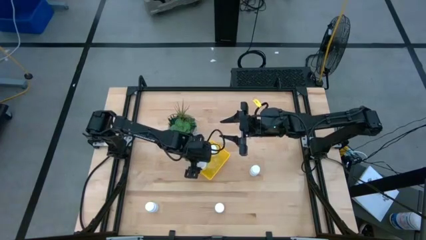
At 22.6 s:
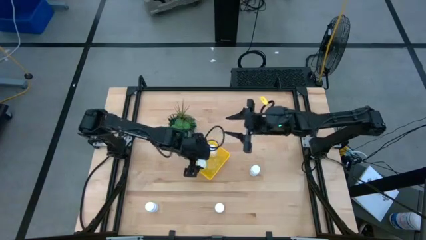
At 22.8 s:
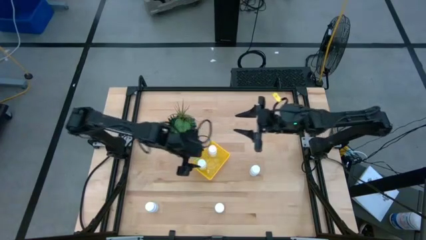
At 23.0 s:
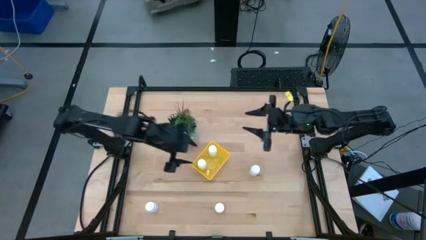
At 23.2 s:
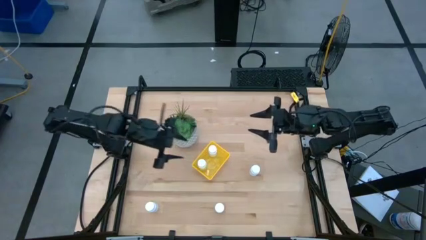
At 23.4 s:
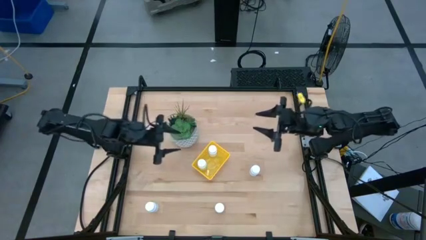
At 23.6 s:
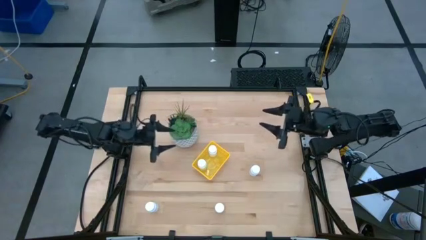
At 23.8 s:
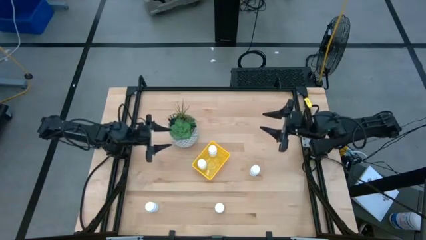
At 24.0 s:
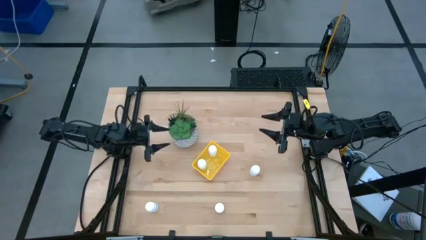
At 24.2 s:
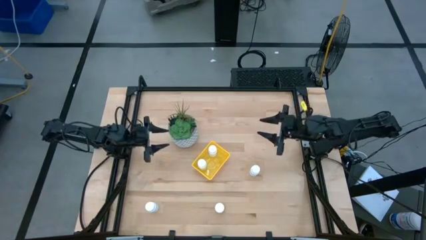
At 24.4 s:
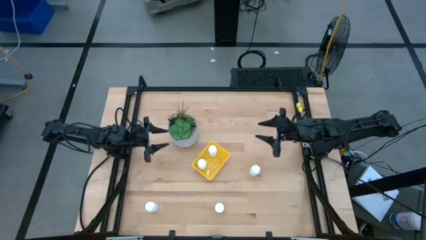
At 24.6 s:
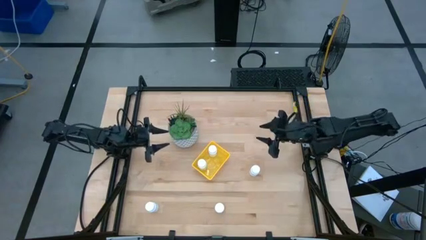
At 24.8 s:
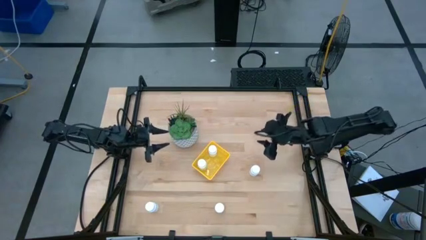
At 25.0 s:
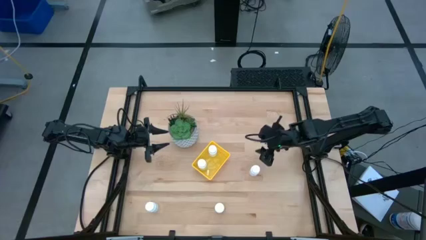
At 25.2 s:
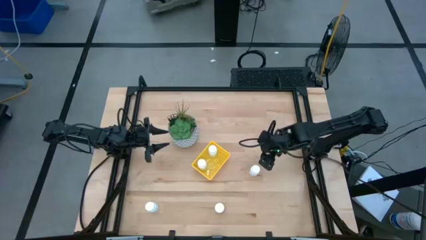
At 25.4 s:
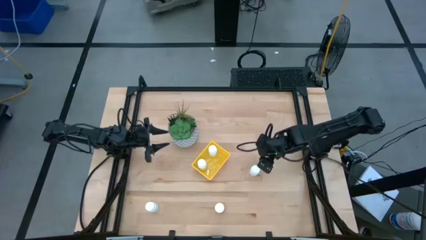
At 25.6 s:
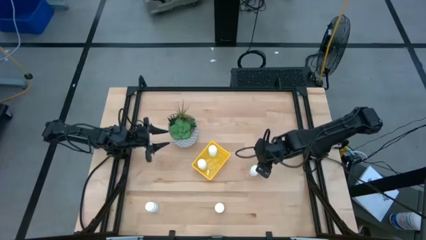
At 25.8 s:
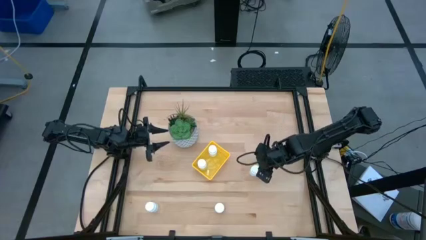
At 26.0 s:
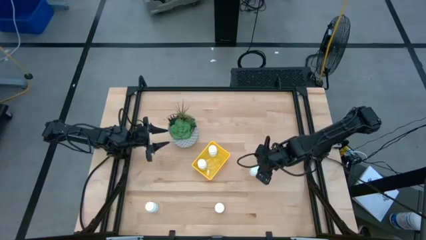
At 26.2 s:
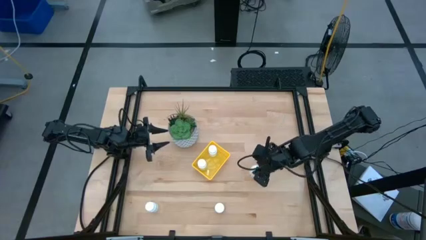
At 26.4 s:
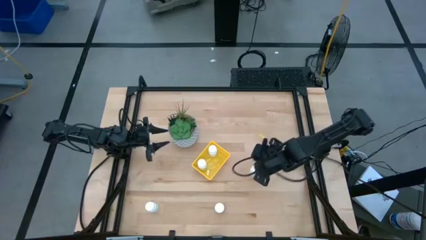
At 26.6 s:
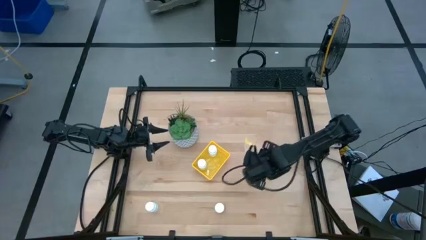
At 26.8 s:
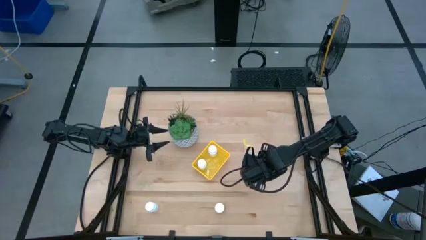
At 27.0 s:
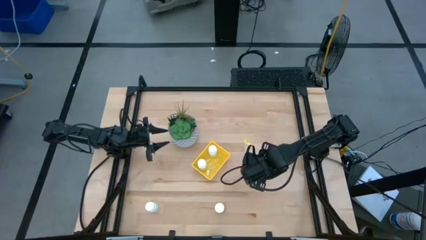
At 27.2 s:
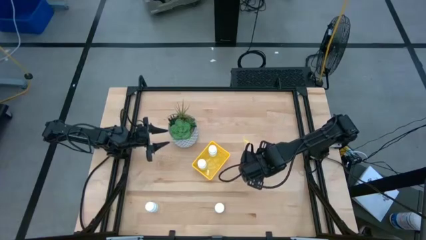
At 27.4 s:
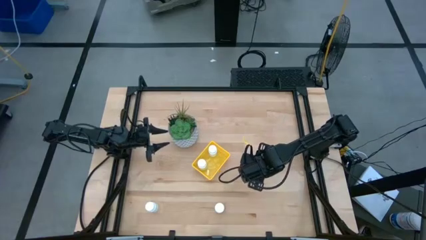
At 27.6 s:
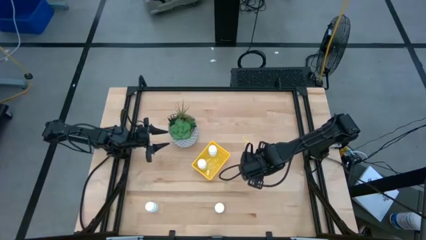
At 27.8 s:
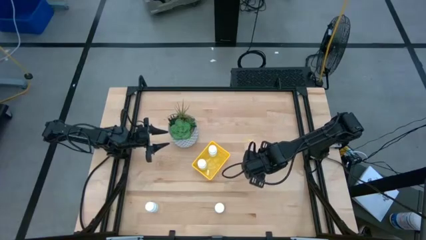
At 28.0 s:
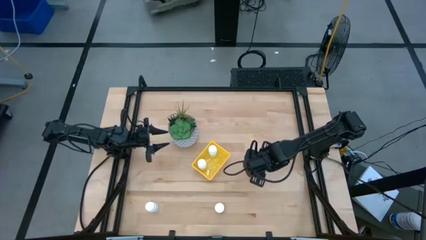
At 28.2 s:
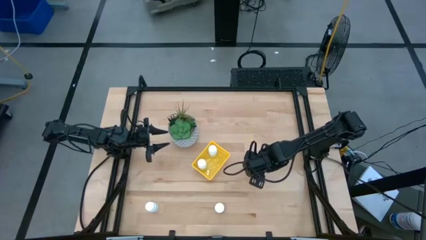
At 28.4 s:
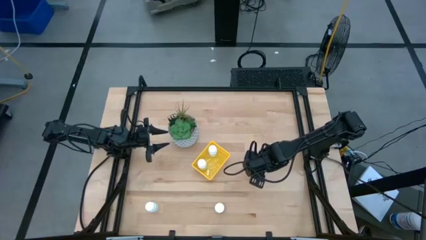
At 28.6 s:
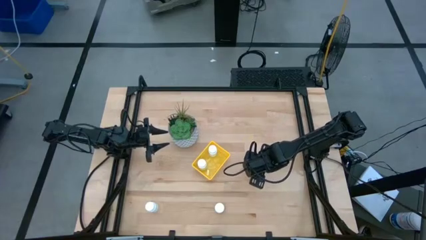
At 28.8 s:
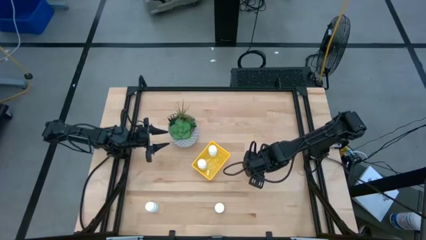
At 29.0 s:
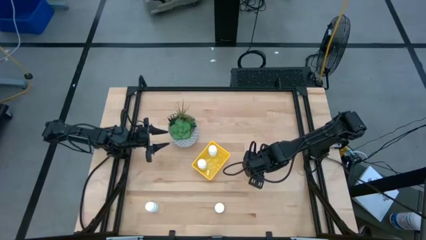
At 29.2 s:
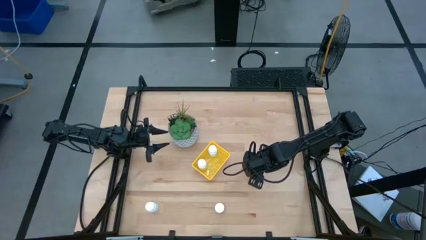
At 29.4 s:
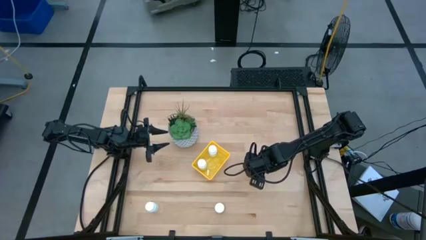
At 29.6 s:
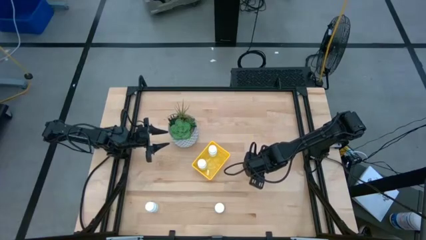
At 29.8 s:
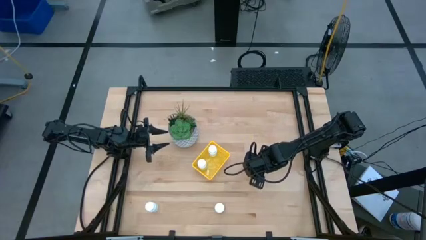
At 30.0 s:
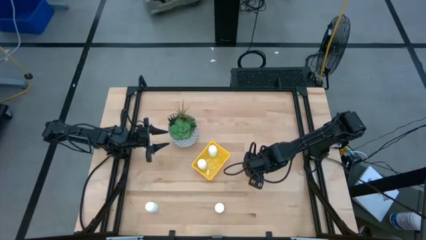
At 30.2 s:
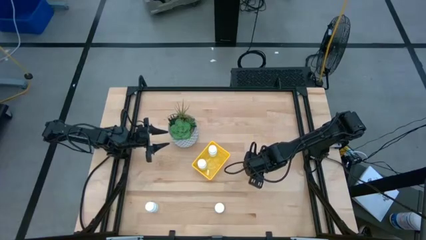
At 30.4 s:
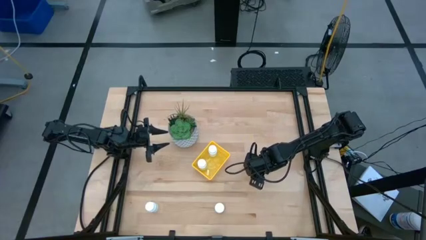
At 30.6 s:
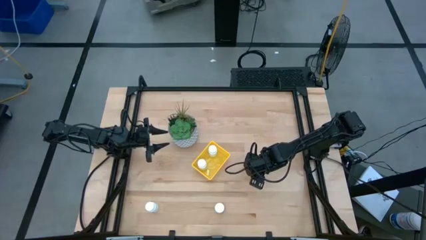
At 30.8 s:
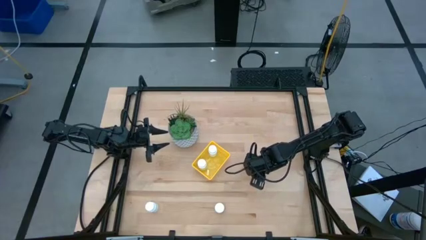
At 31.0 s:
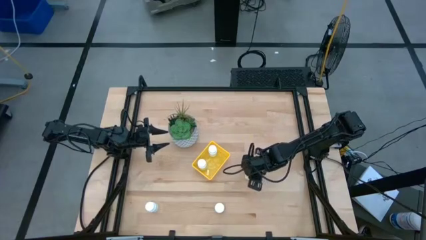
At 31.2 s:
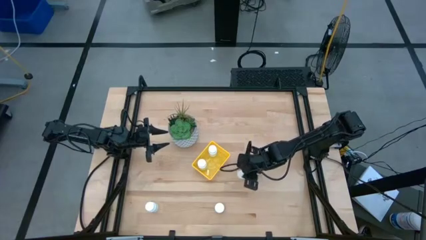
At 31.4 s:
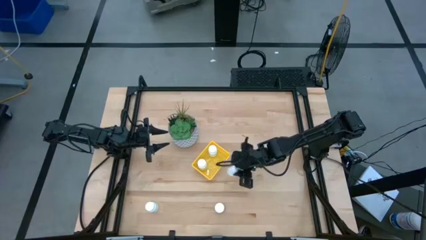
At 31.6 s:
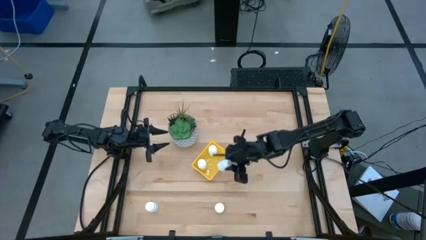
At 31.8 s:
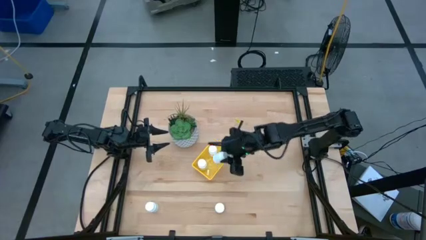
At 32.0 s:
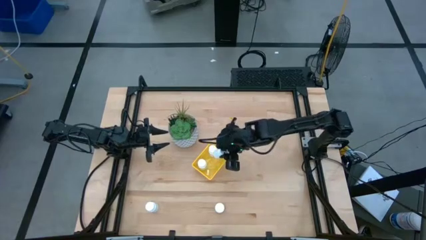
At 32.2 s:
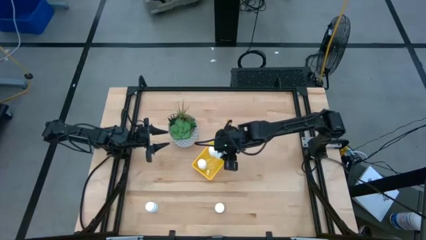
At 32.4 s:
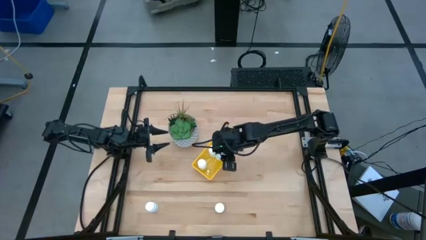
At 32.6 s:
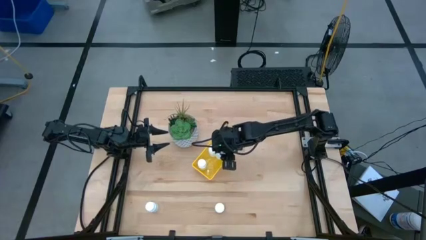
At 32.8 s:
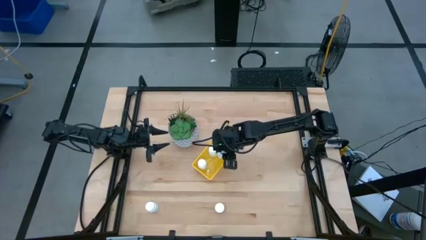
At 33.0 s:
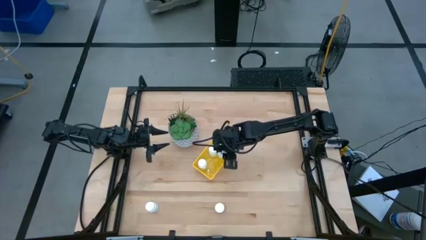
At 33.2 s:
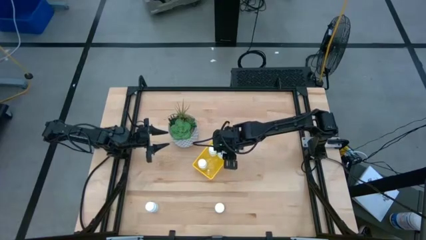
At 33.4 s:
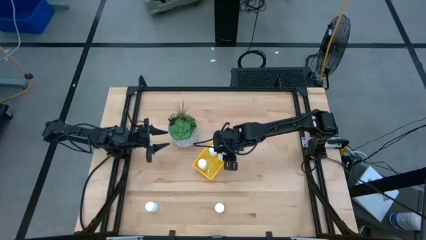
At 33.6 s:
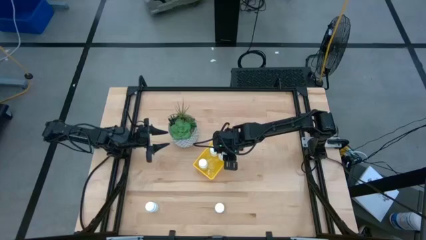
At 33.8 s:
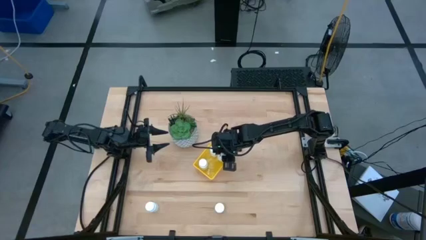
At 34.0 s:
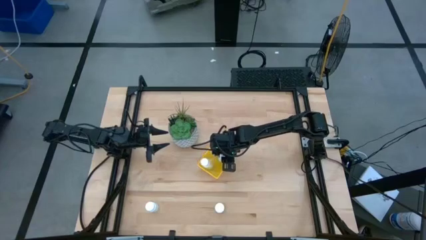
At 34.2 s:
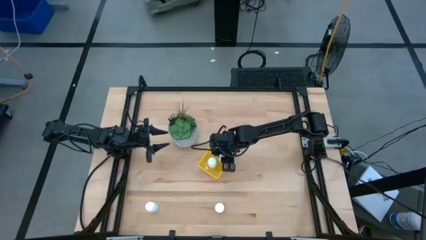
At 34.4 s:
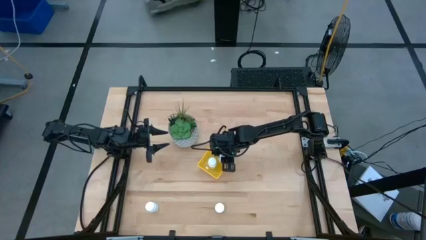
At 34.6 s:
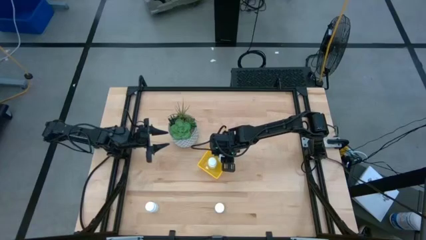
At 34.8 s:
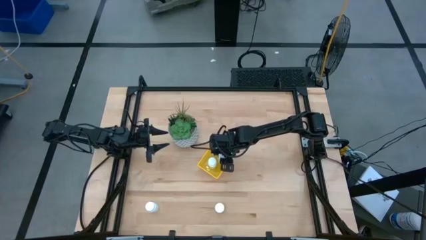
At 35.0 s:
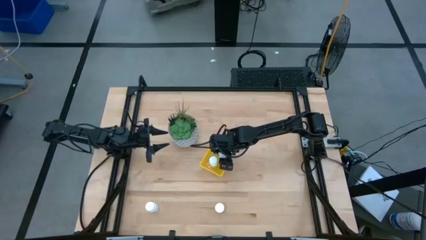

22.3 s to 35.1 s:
Task: Pick and place pill bottles into a basket
Put the white pill bottle into the yellow basket
